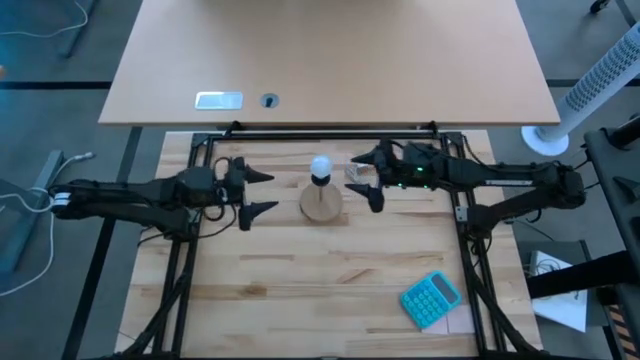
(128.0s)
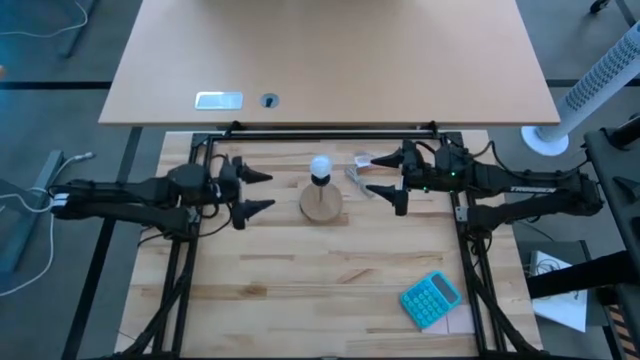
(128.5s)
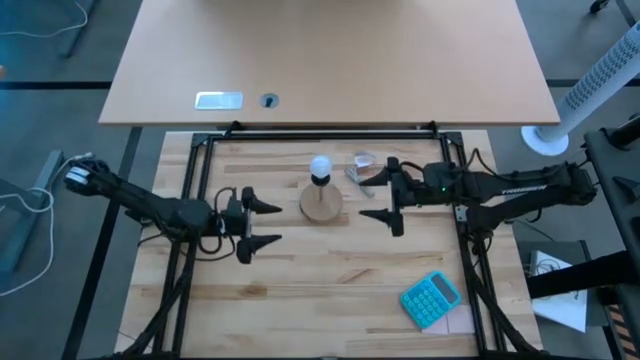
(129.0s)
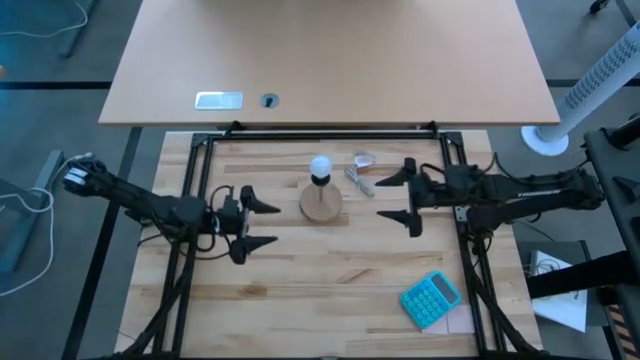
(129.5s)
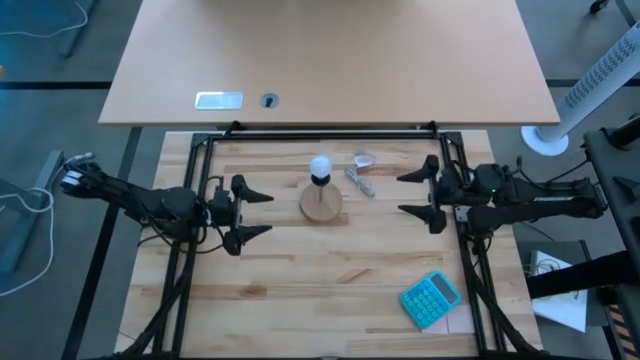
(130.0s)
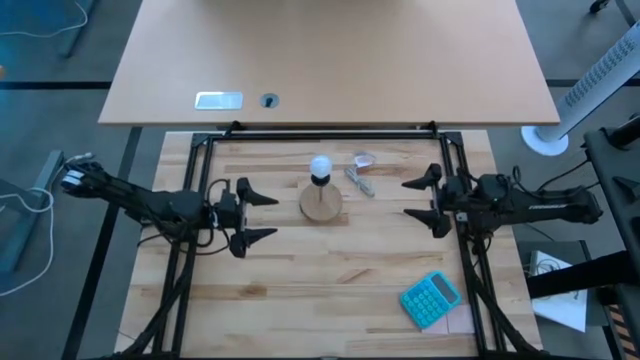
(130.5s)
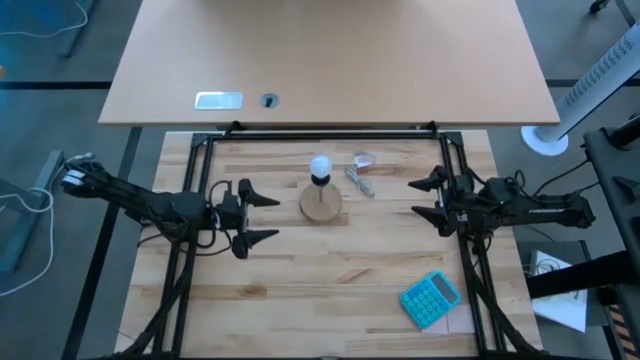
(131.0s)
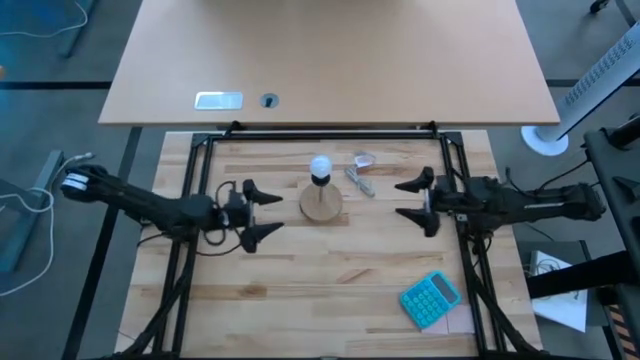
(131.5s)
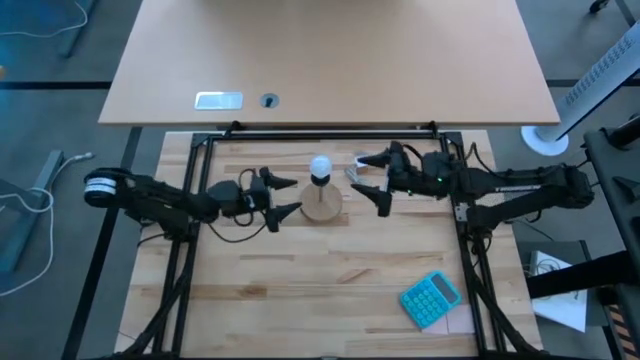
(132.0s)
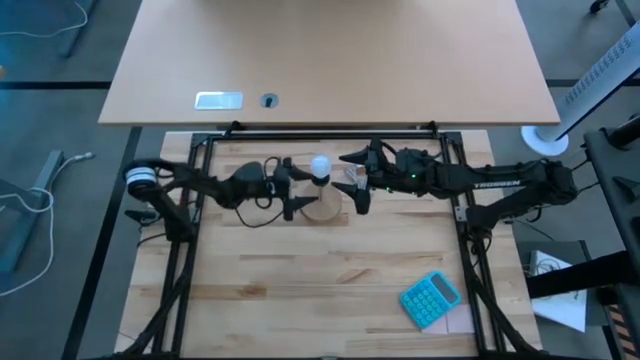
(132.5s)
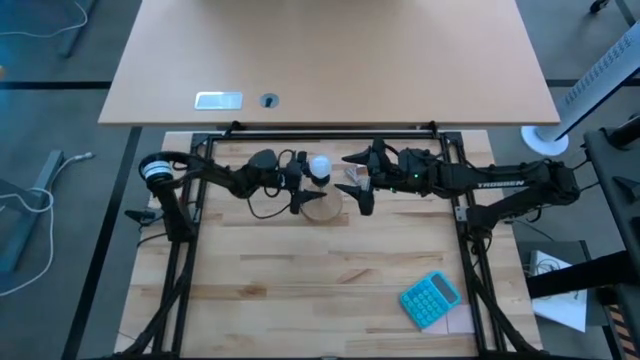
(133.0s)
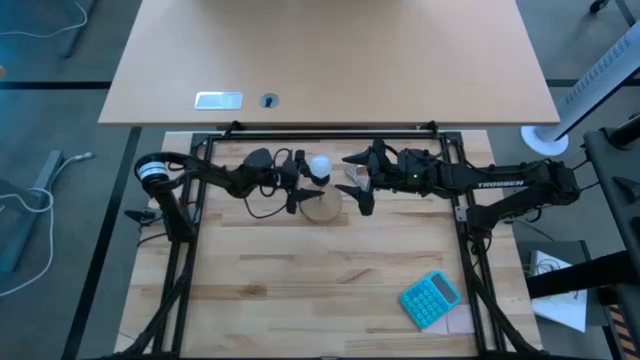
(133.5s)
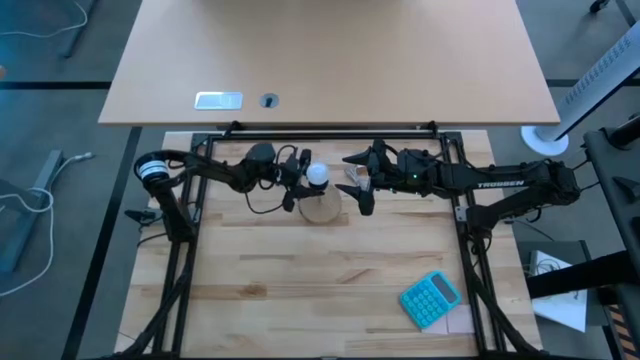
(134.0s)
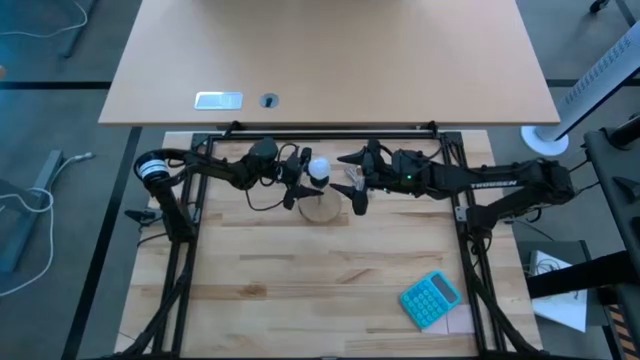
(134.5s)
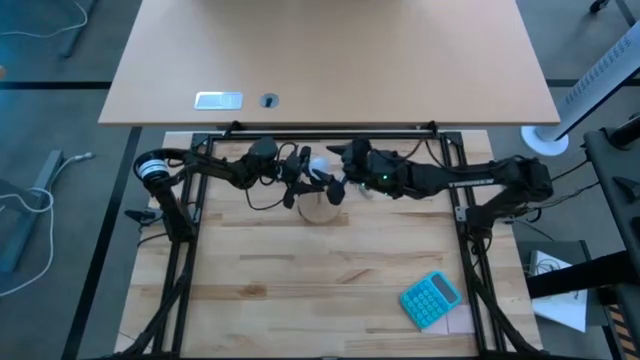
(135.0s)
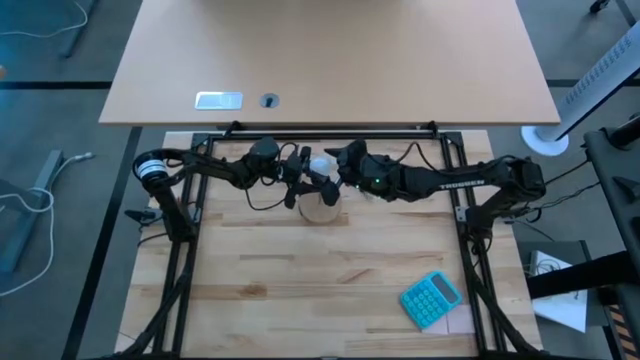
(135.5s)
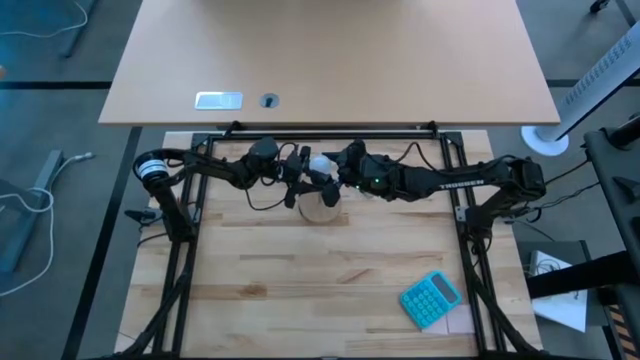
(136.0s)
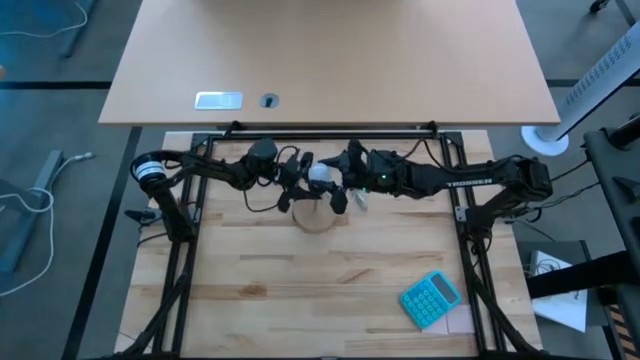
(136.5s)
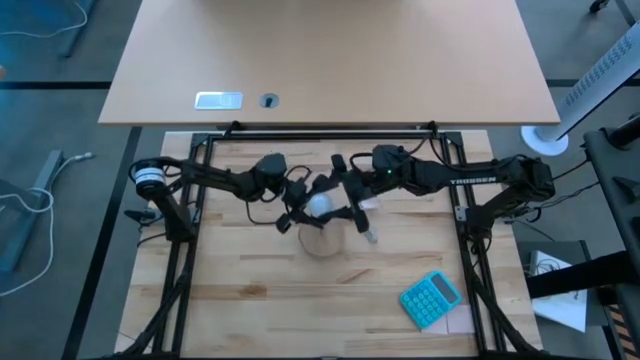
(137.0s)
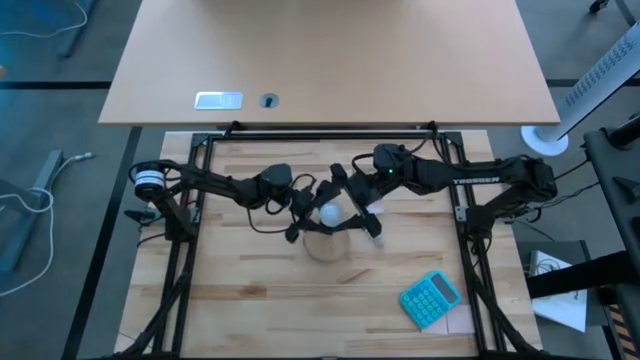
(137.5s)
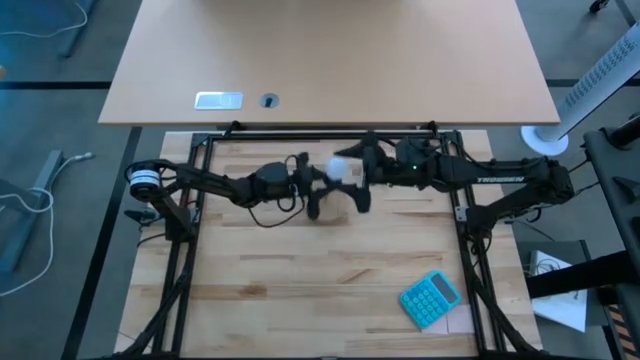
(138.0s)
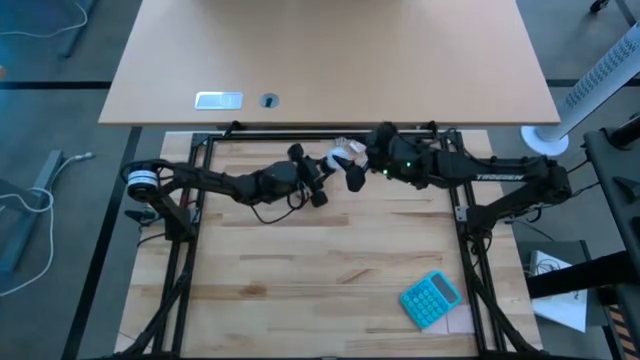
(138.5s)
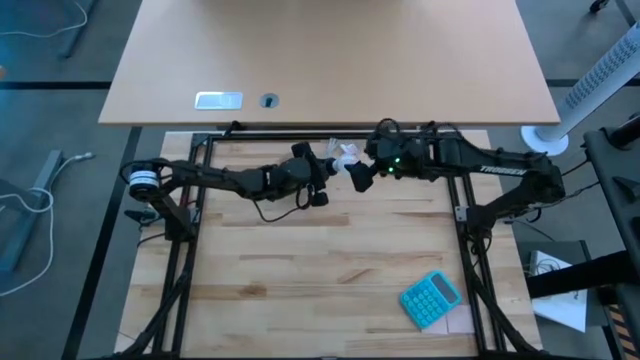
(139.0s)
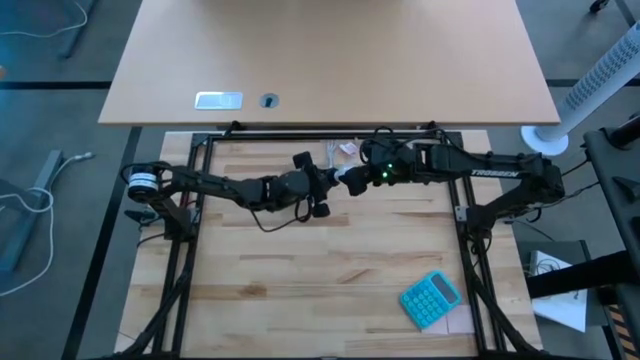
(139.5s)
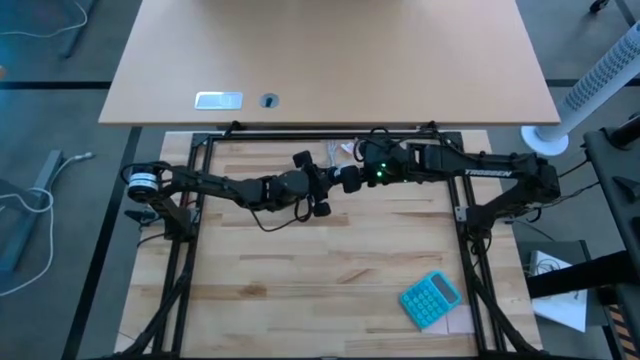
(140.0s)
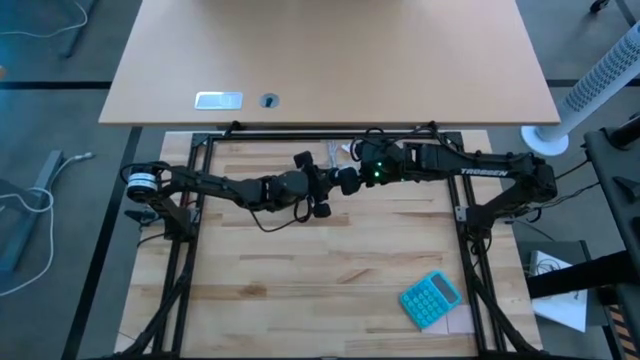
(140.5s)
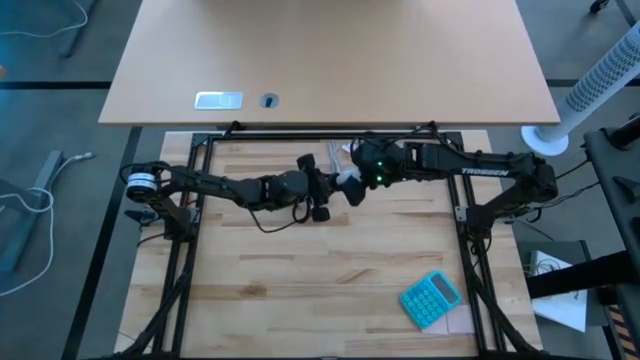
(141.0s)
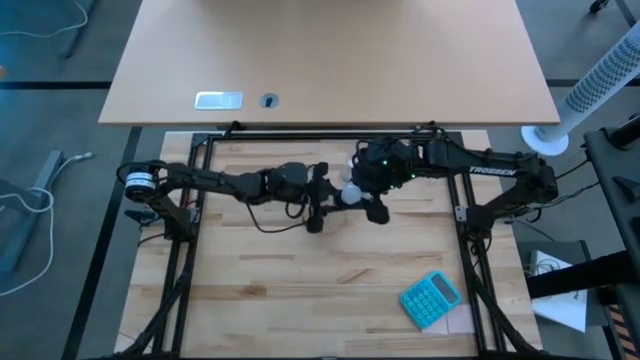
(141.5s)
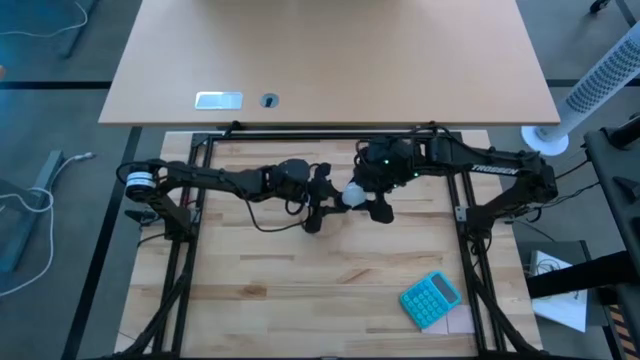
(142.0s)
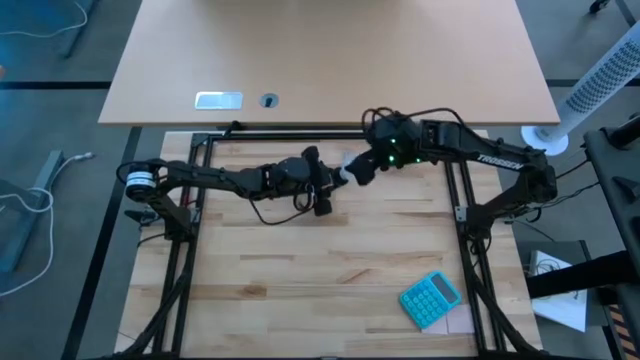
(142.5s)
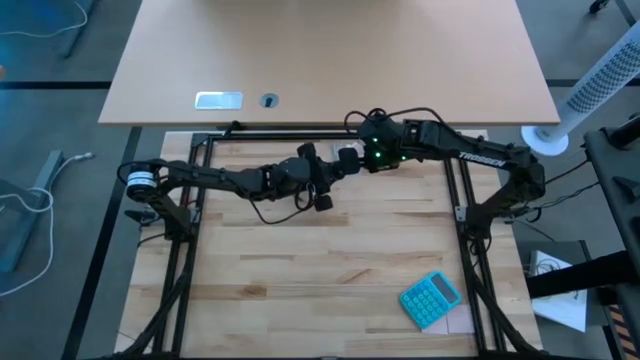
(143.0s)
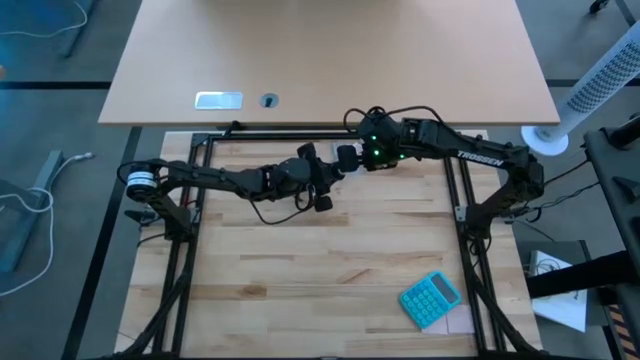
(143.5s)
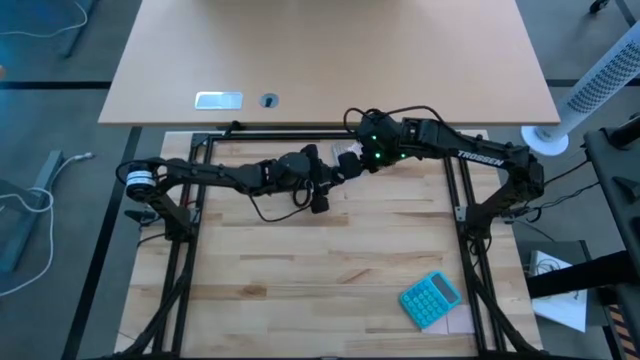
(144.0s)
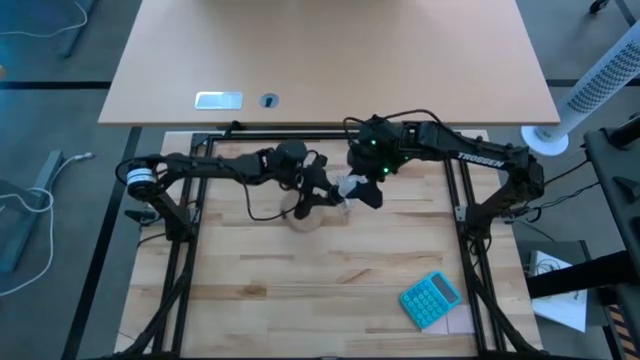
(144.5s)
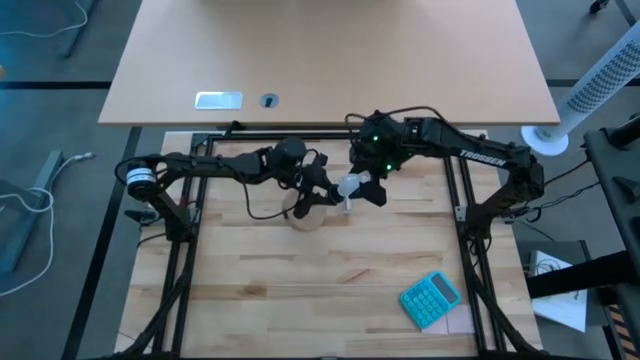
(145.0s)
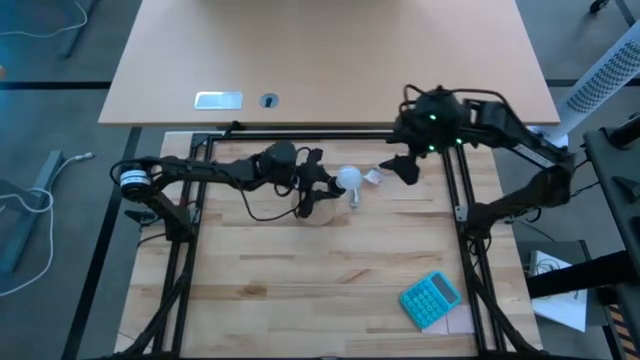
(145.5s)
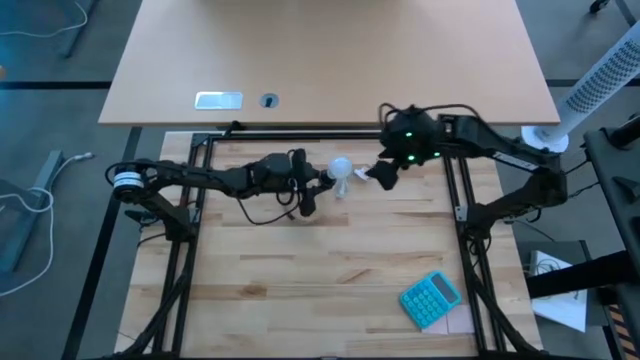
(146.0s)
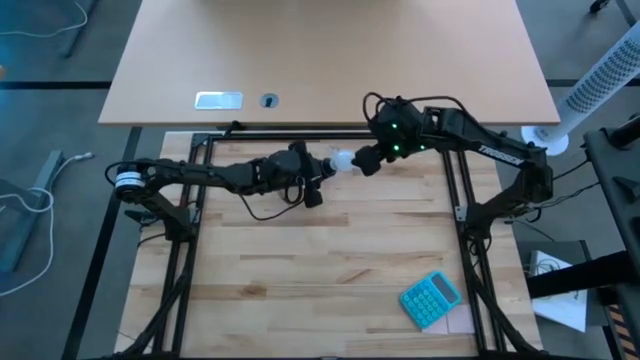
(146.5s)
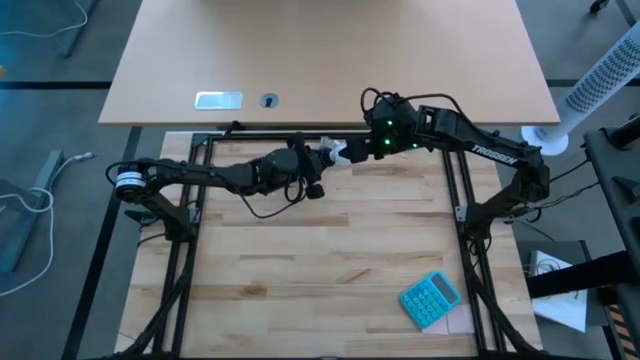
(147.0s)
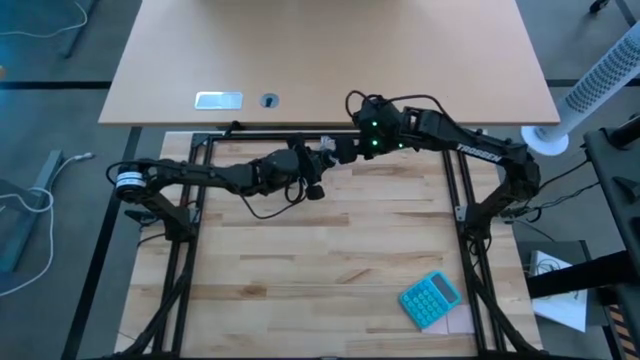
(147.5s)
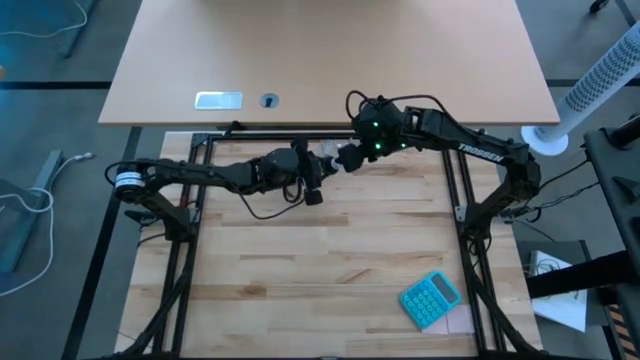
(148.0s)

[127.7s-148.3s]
Task: Screw lightbulb
Remove the lightbulb from the lamp
